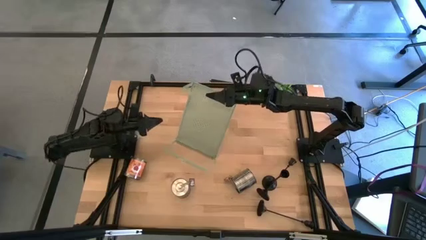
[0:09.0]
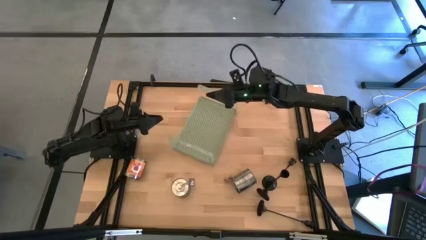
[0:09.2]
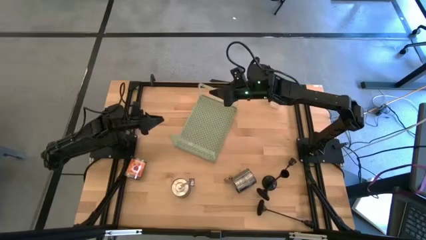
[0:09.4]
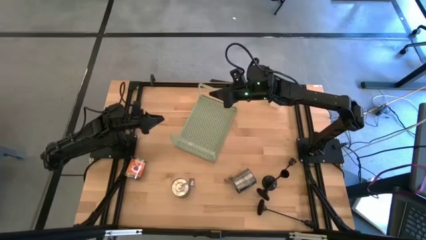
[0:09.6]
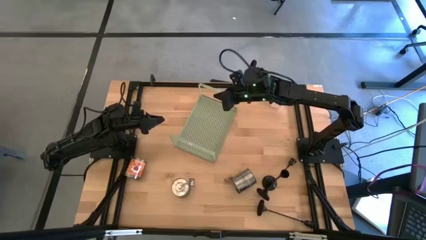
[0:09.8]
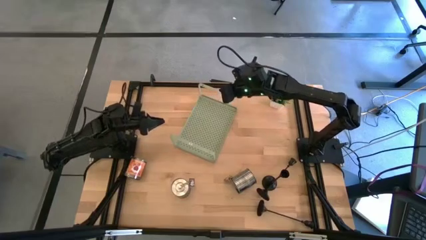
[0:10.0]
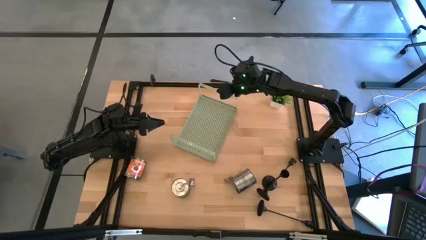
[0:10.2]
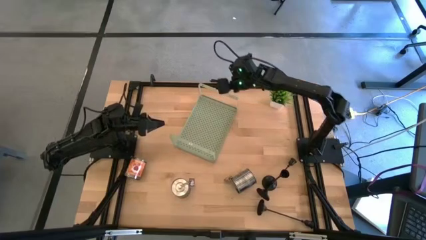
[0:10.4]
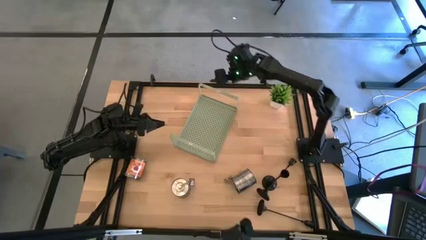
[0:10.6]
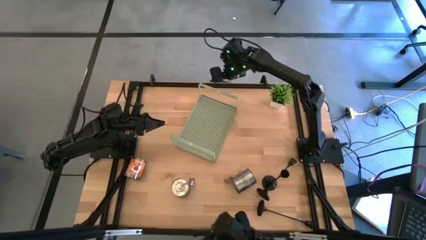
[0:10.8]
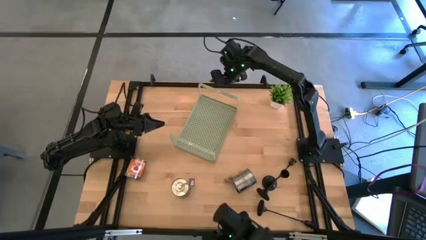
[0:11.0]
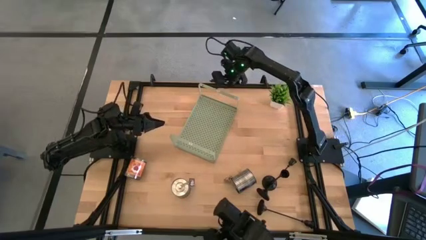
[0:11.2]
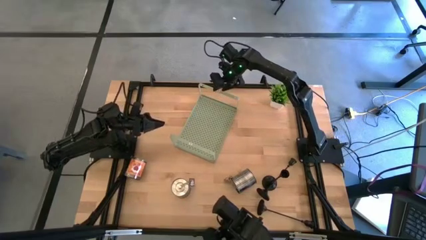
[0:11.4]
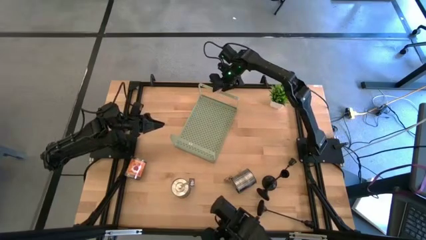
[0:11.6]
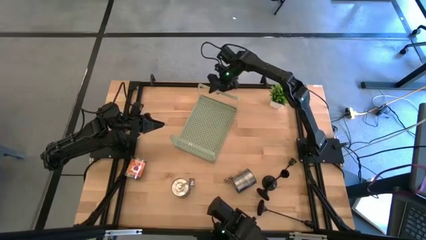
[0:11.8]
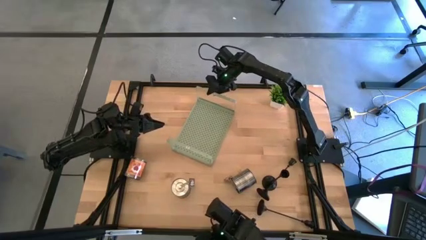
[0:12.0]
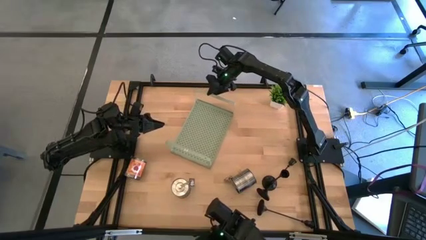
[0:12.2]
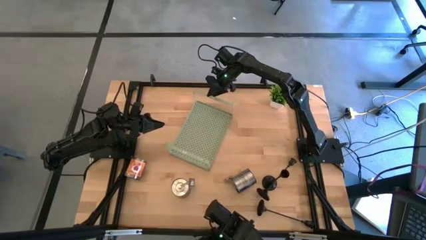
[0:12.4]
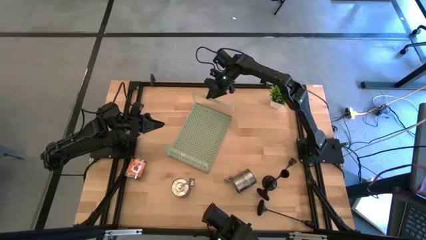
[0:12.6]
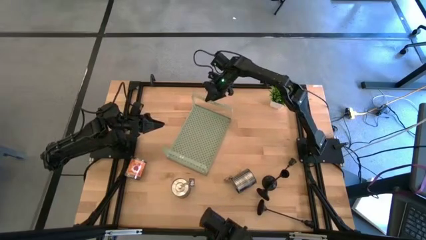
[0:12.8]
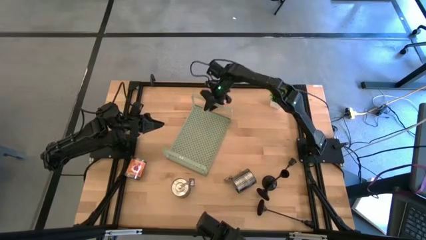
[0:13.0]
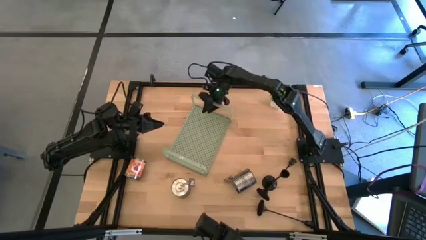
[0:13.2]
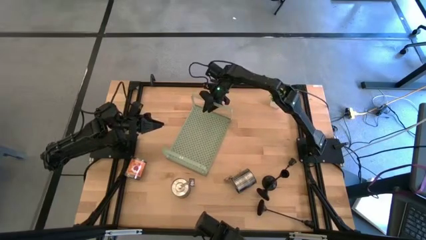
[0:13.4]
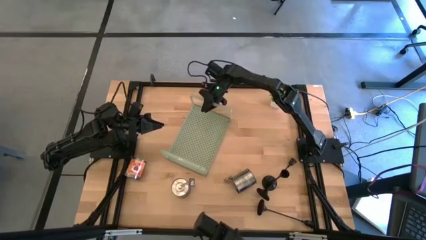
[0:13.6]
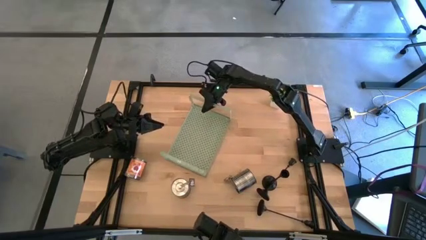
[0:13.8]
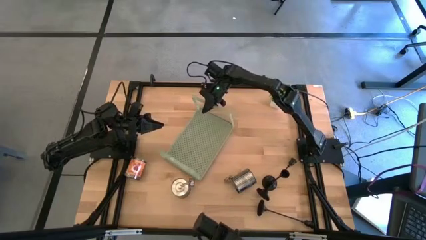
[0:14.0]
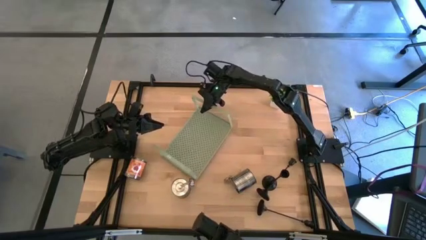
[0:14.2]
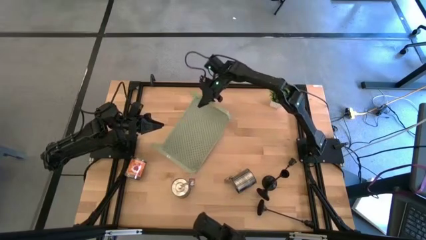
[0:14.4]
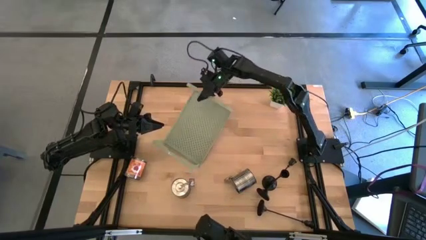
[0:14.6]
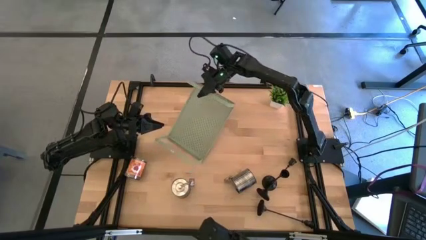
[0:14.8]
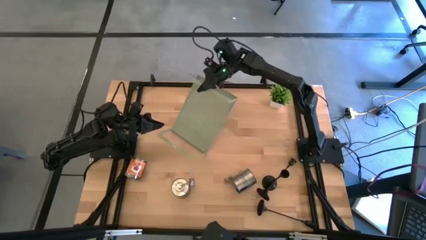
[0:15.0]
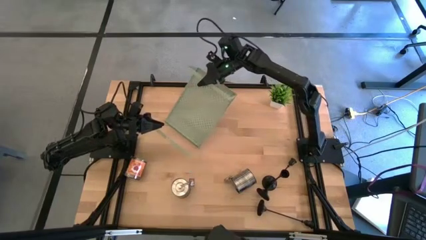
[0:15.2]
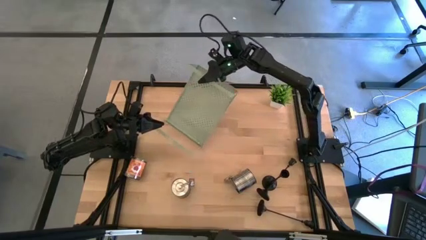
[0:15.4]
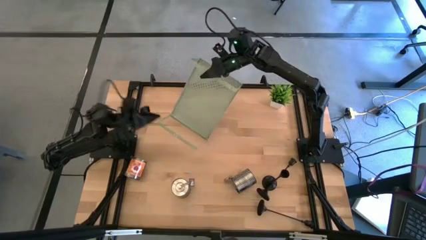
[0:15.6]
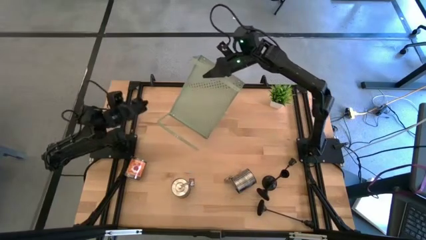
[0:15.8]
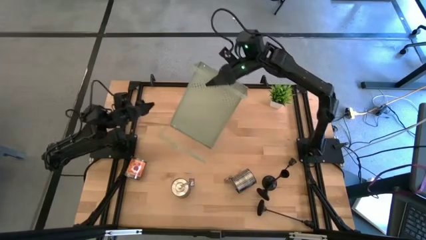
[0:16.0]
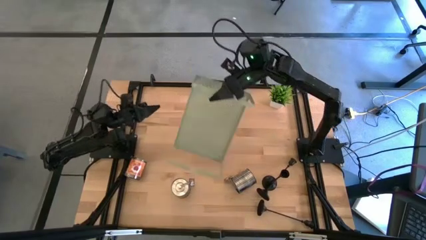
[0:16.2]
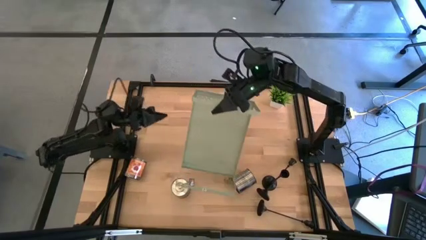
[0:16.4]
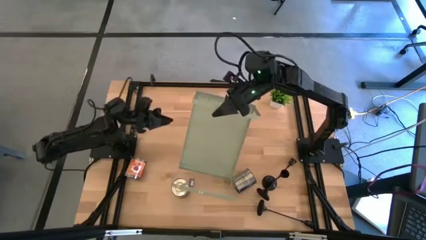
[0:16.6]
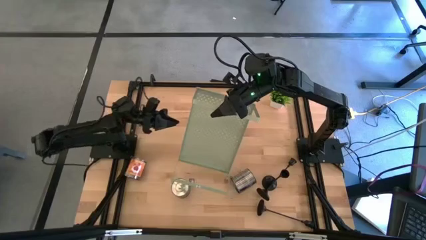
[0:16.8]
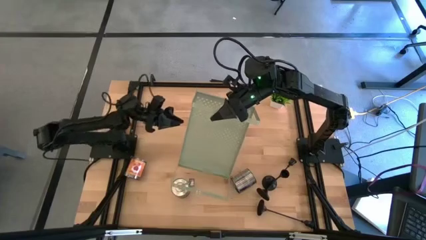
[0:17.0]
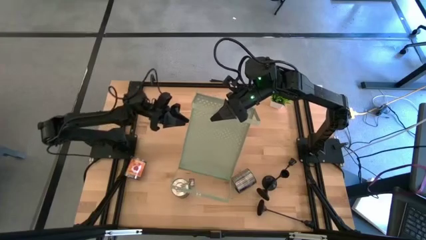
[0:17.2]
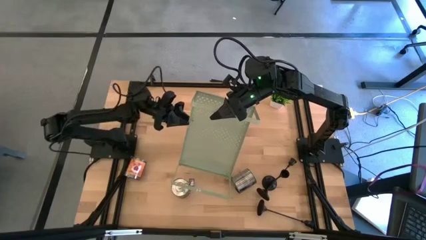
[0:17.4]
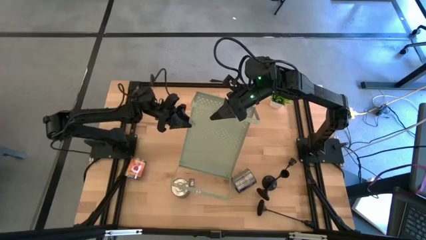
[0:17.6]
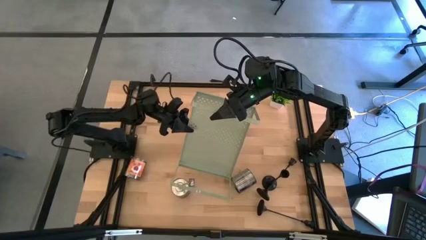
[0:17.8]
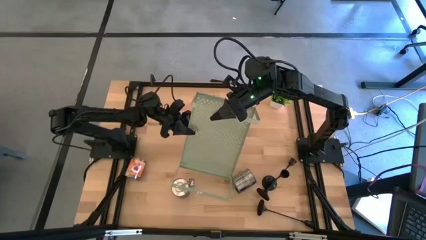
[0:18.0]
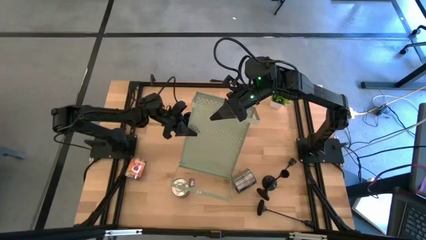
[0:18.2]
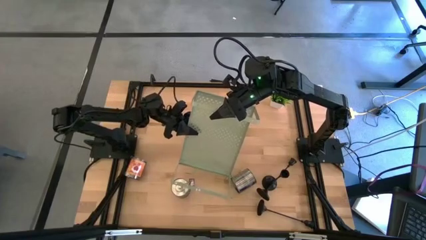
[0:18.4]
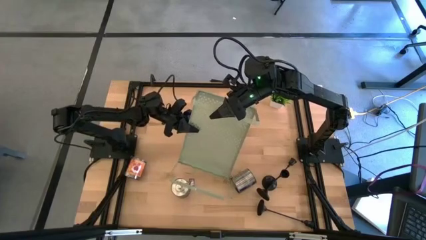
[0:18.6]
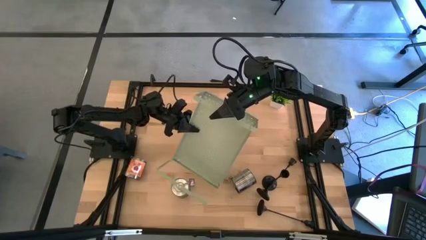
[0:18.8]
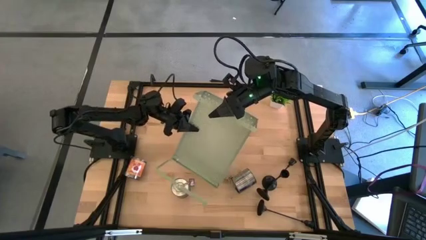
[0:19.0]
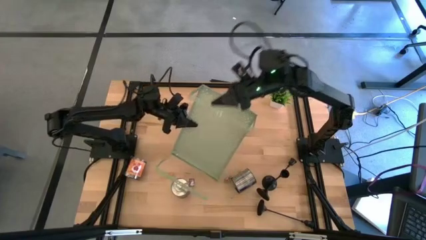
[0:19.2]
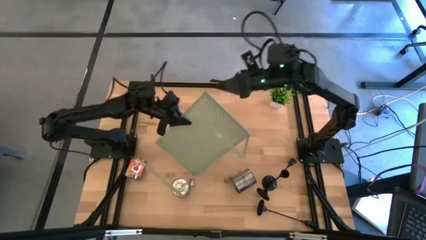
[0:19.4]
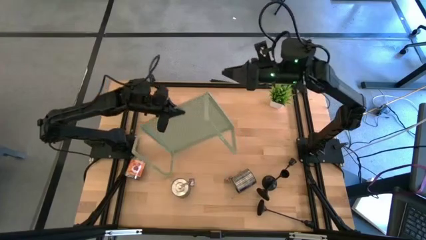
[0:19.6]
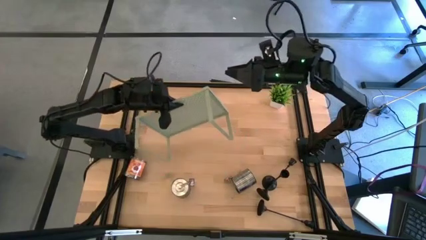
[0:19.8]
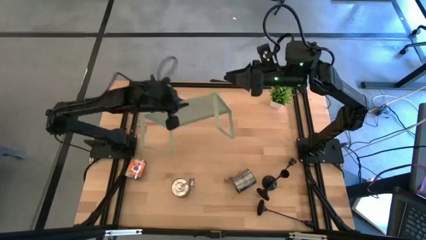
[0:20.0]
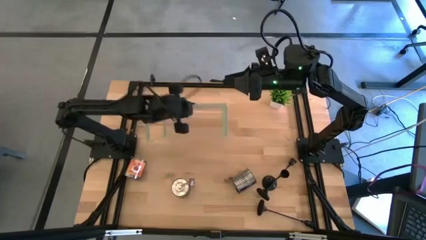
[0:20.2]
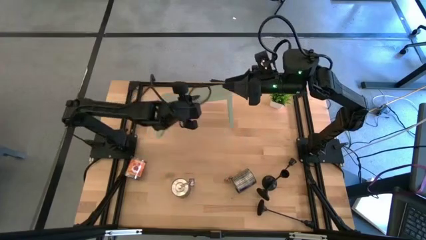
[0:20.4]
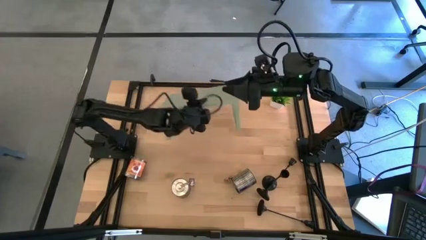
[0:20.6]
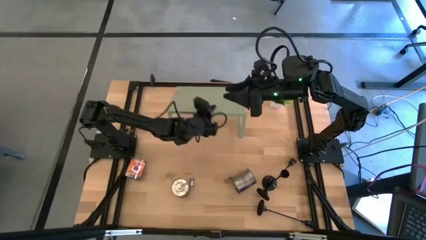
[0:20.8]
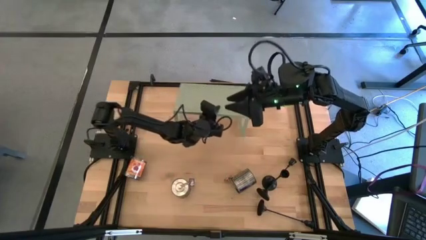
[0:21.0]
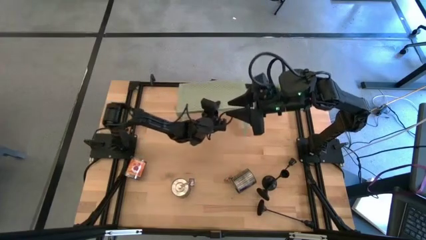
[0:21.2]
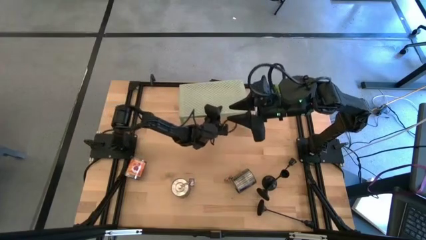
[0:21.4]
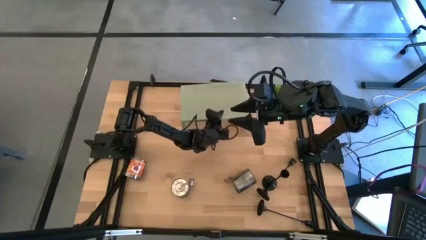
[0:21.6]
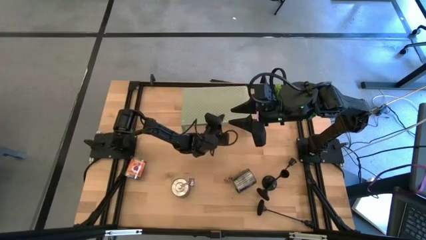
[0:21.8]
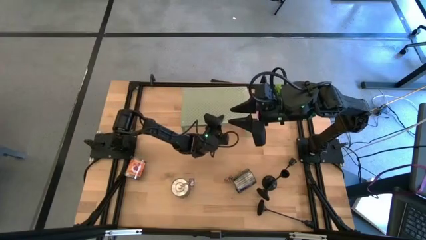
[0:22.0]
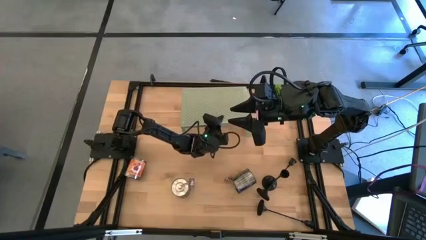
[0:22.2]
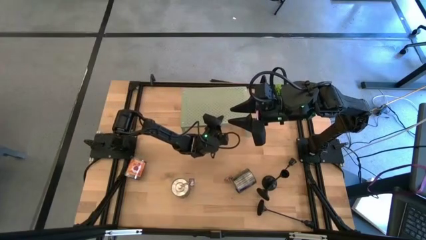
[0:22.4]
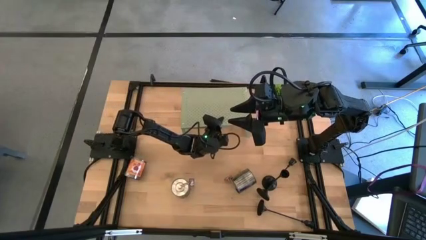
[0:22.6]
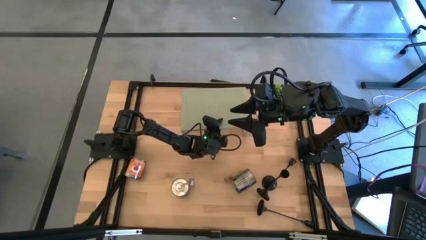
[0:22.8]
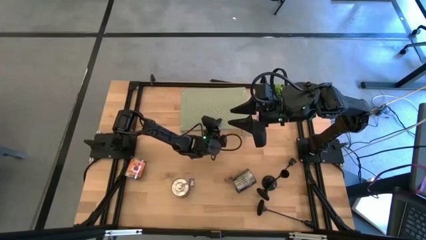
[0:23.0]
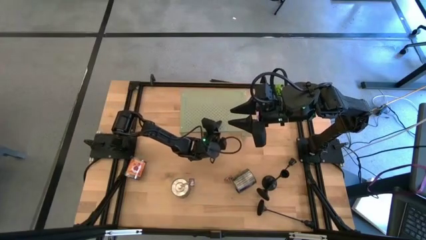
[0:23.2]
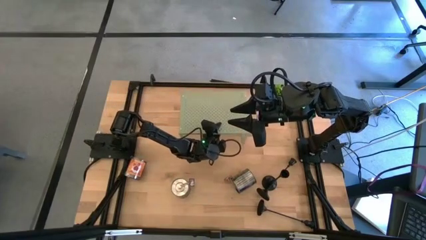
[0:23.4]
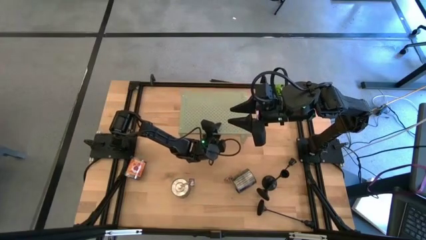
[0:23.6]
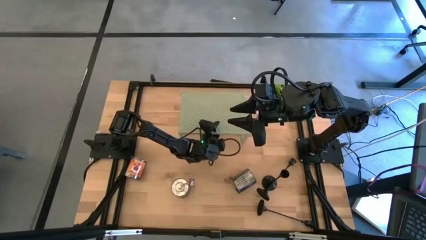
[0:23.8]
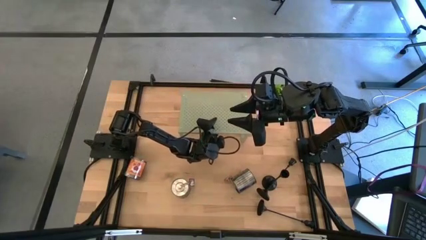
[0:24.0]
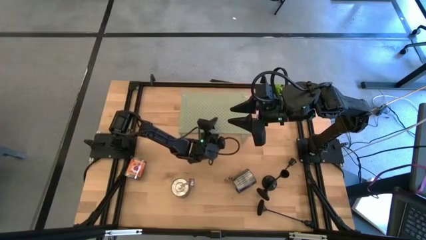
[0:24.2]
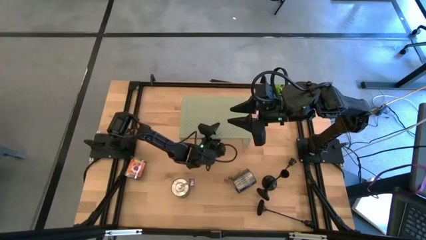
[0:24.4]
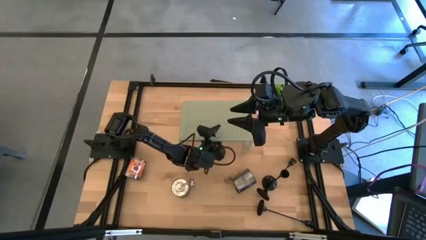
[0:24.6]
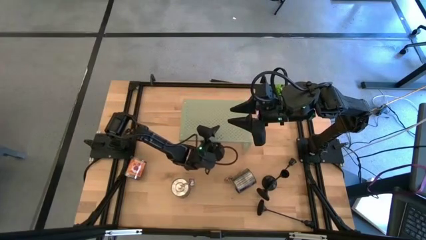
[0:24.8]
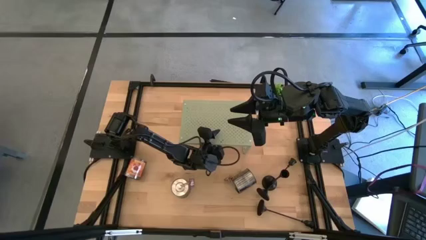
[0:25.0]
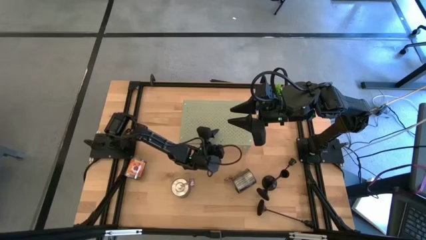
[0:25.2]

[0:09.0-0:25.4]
Task: Pick & Place candle stick holders
Prepare the shelf
